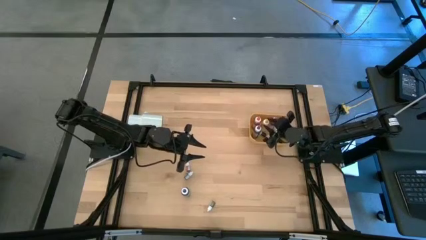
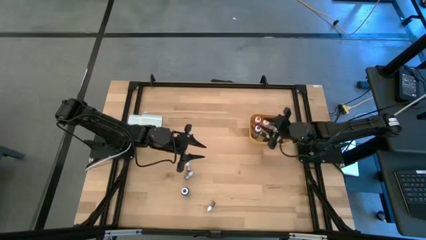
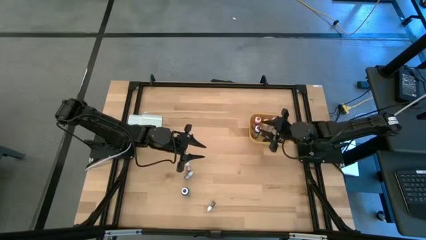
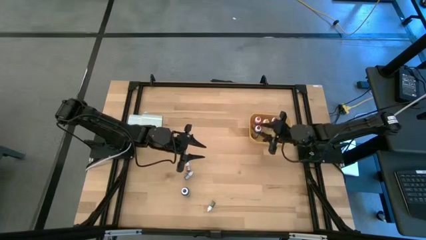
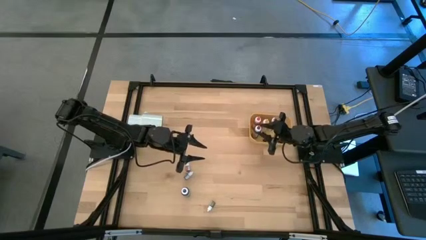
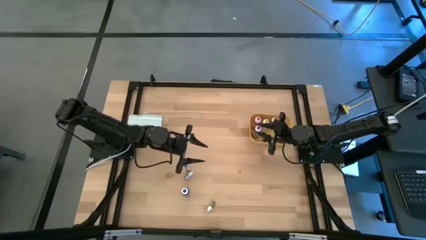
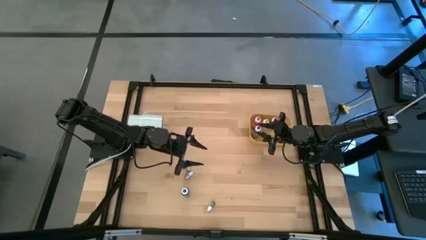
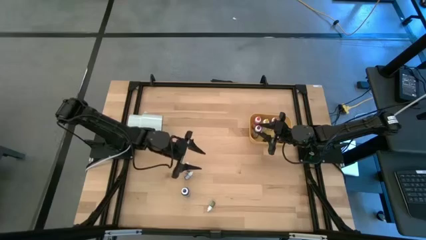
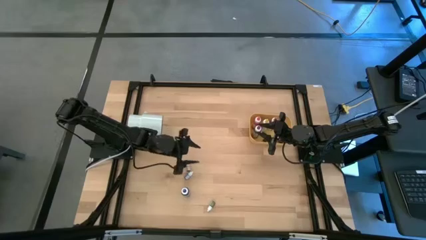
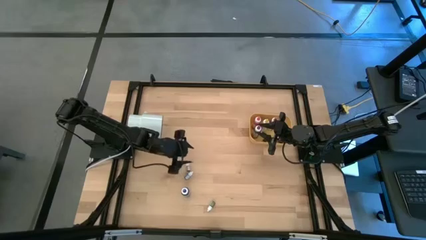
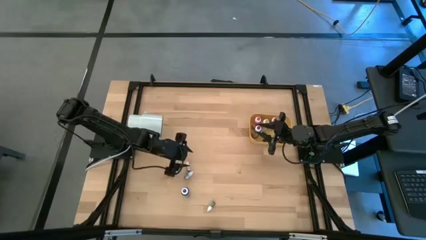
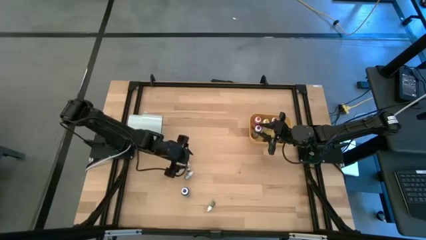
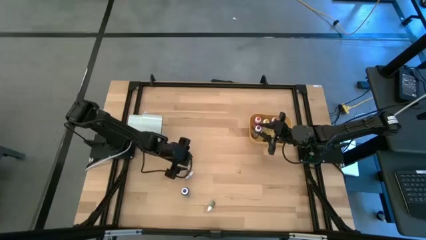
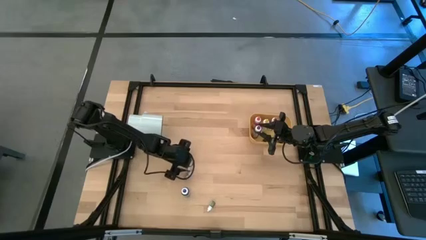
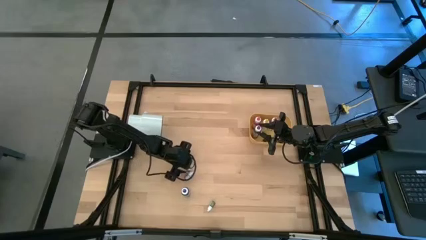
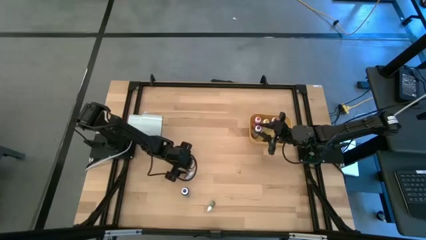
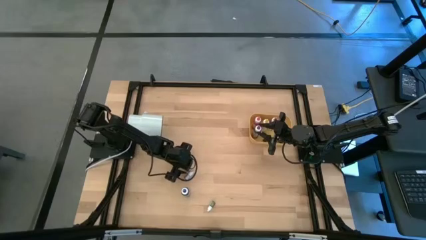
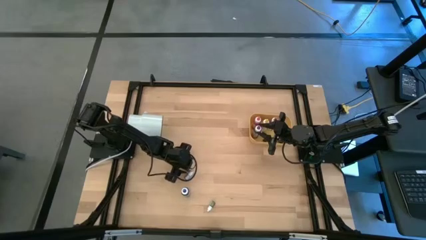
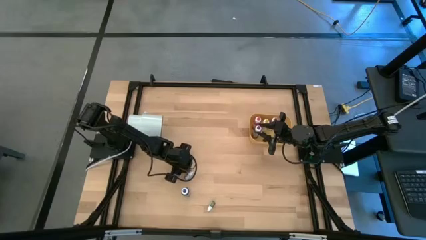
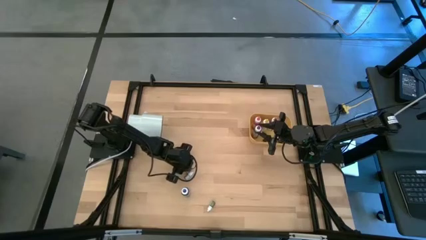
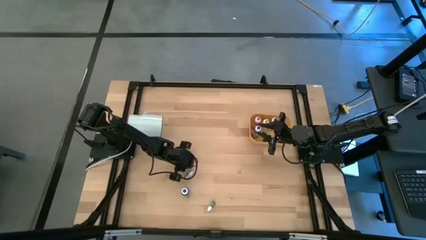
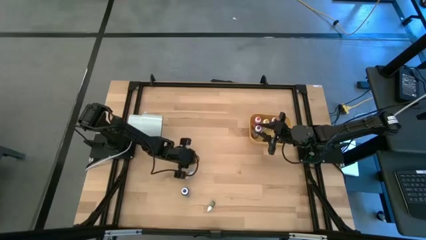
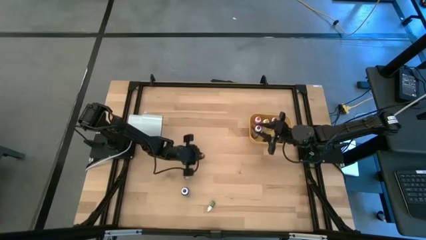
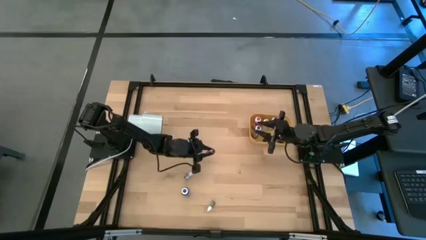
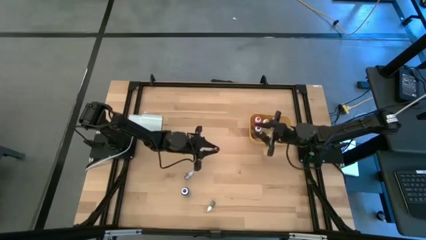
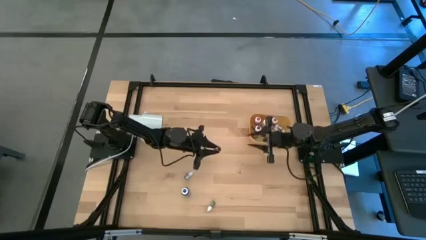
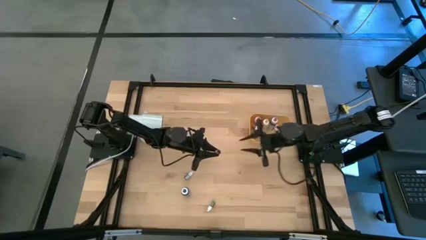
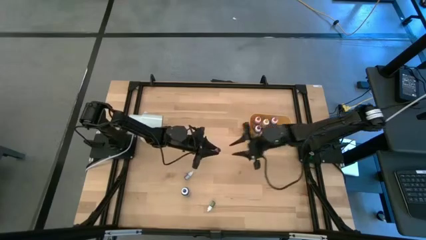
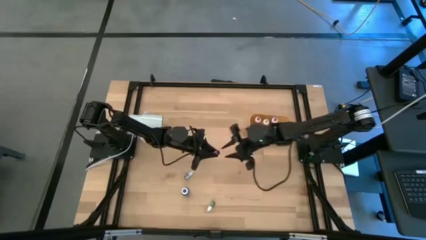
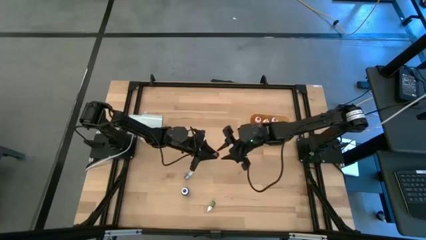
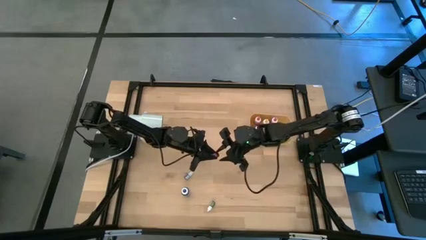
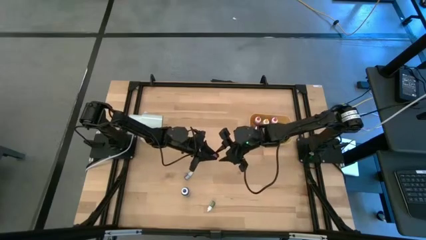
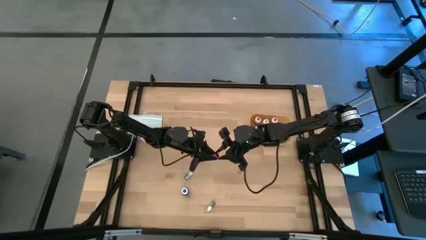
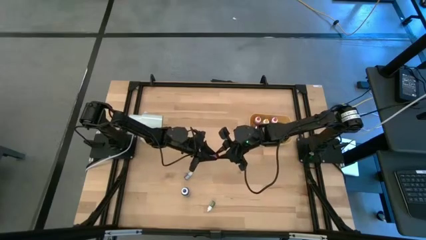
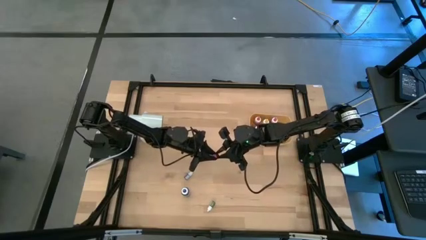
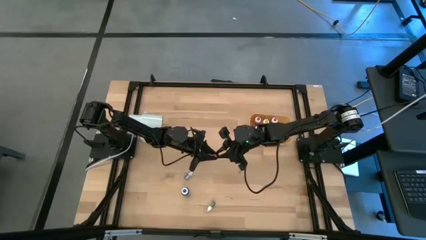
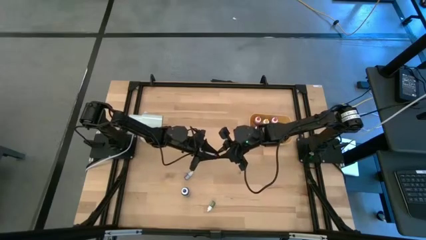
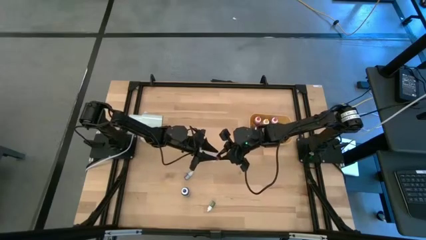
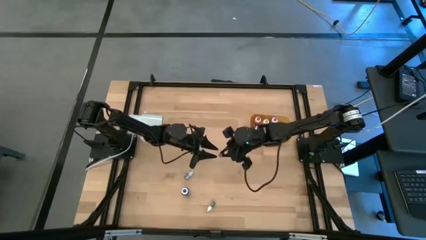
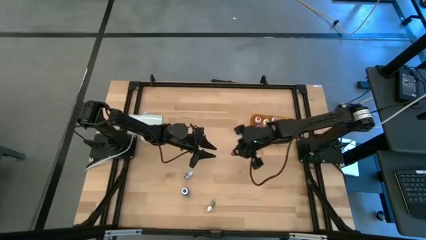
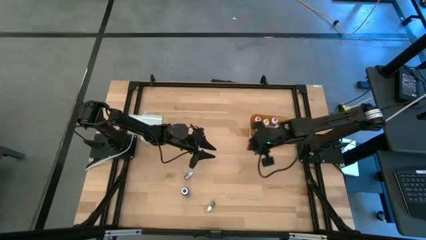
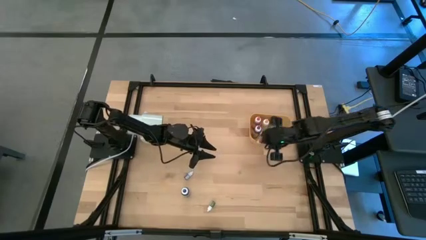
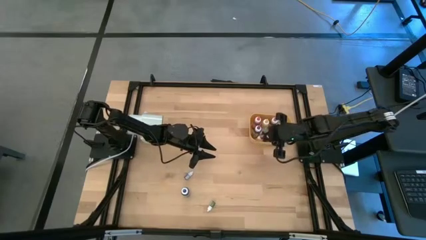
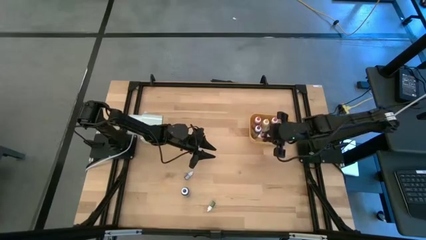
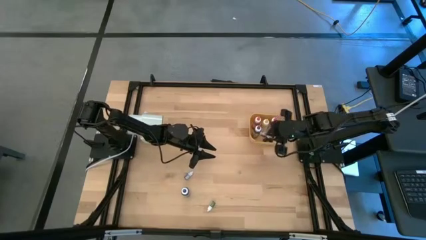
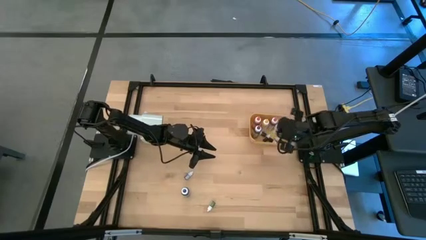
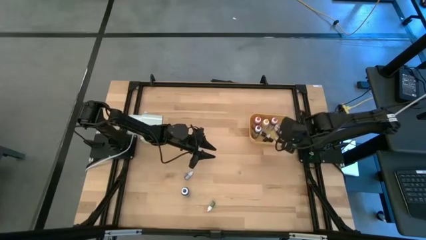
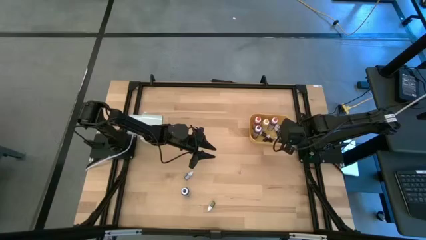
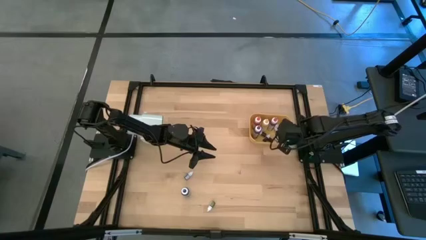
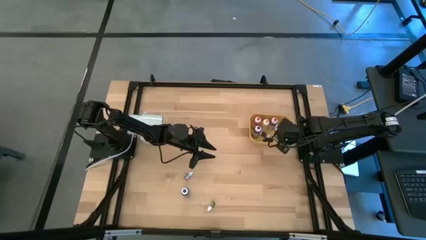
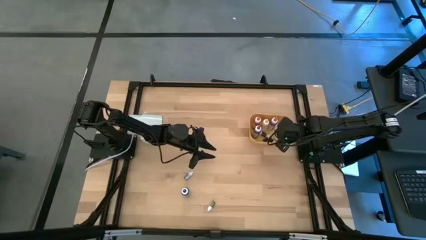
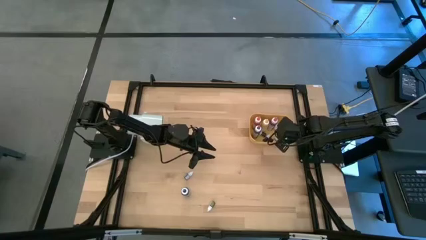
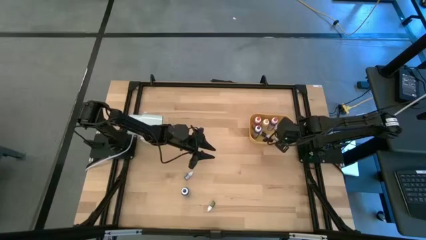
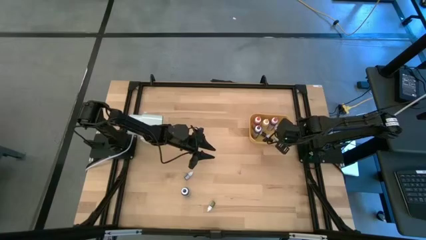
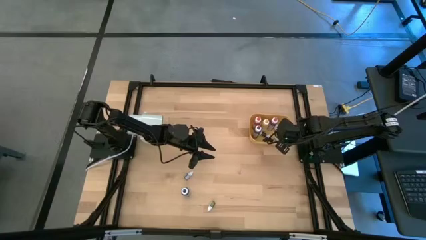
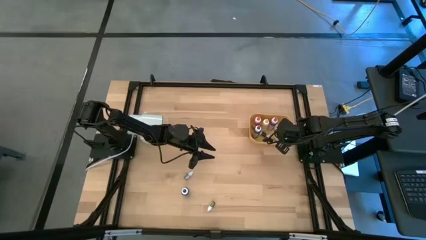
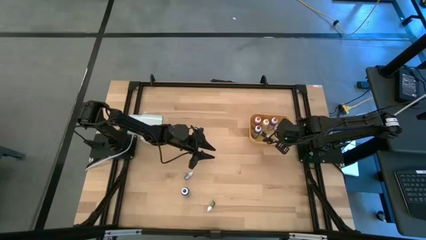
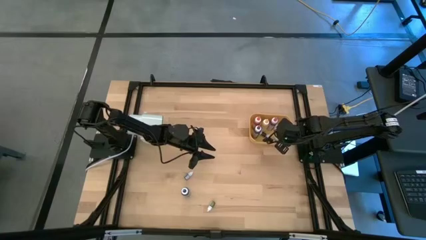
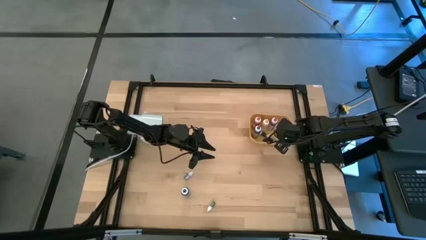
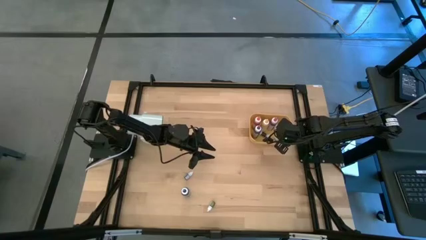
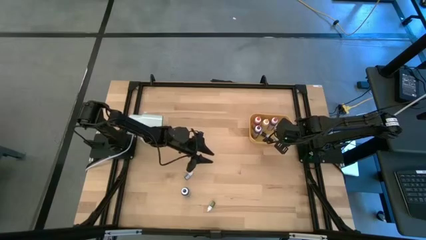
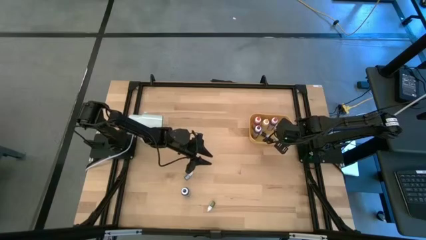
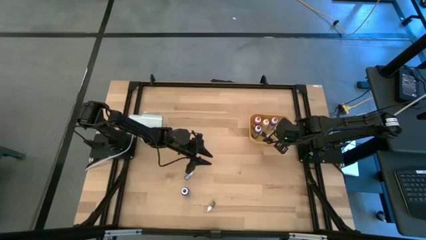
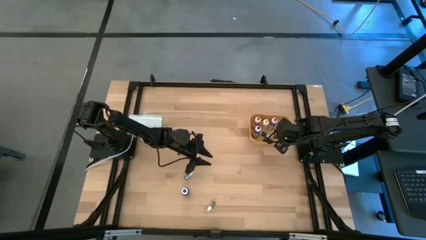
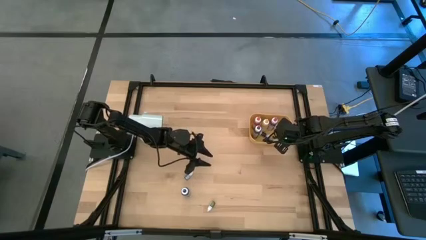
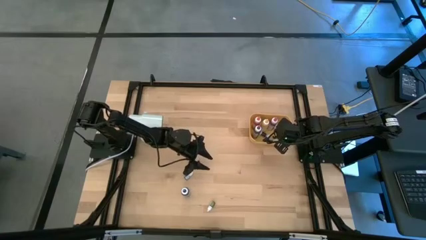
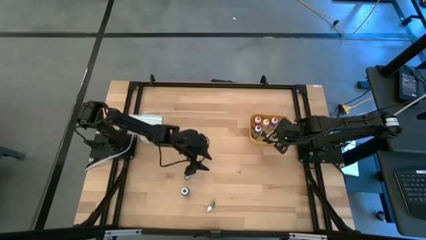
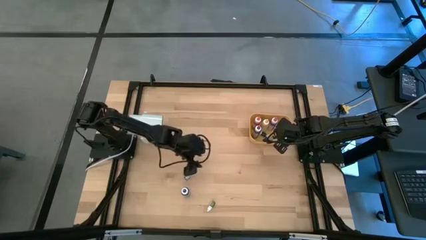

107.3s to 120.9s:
Task: Pick & Place food coloring
Put the pink food coloring bottle into the yellow bin

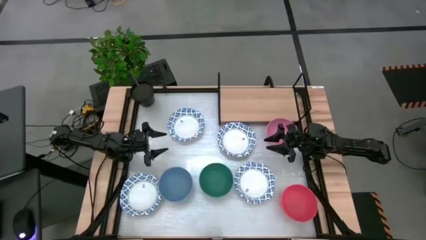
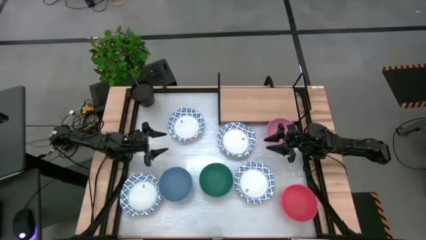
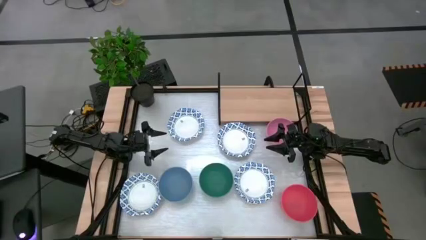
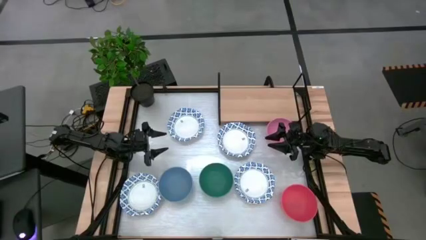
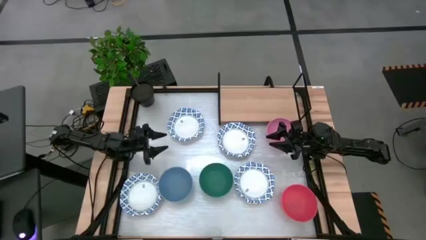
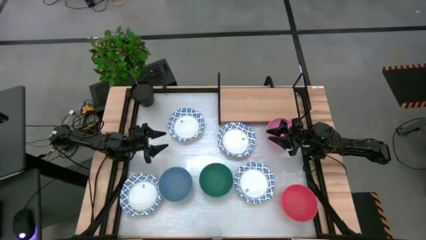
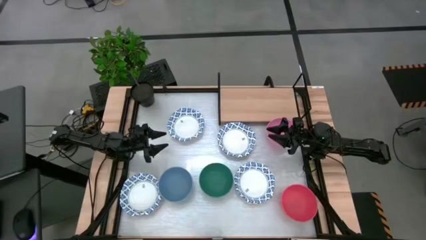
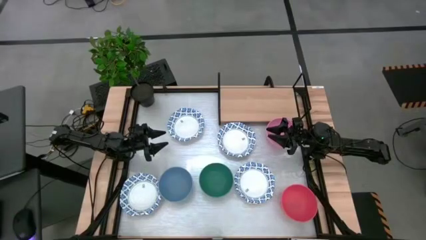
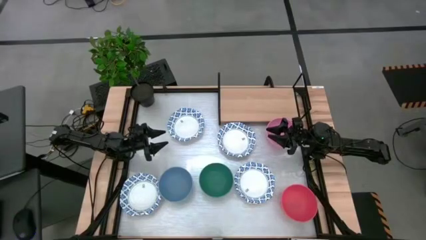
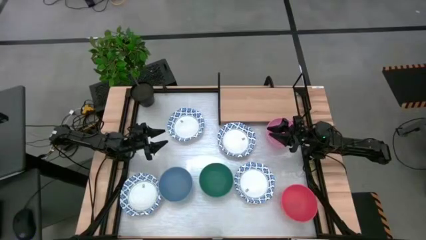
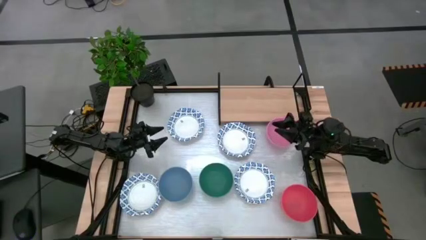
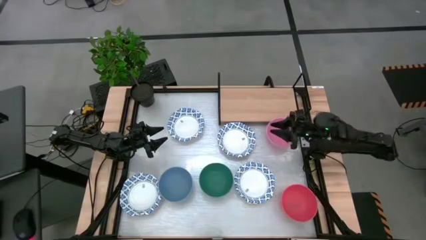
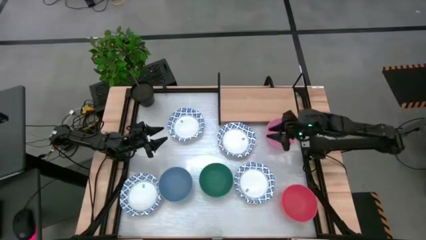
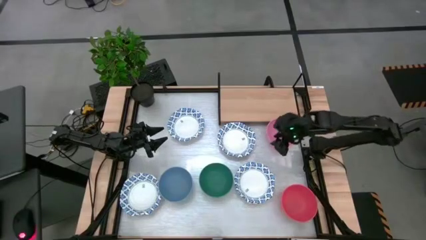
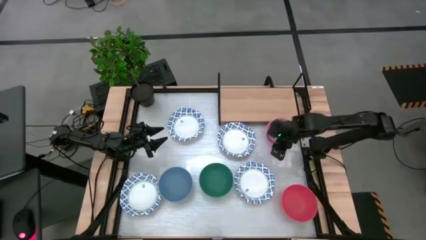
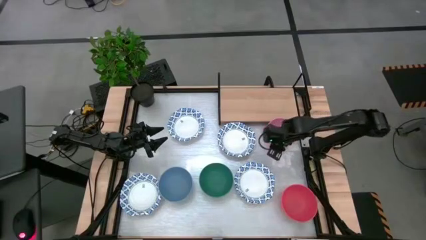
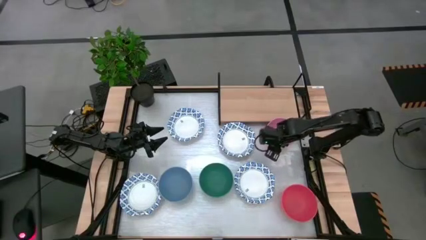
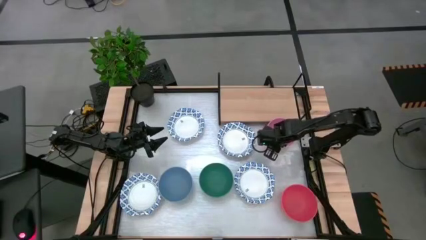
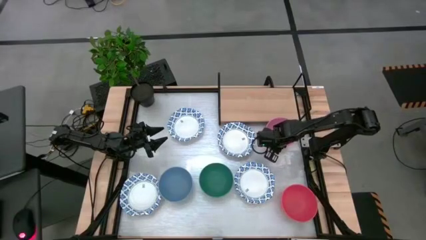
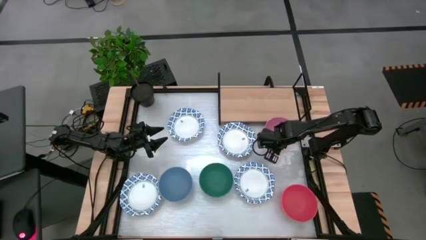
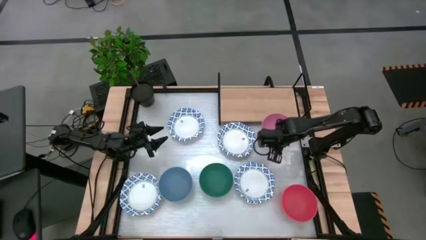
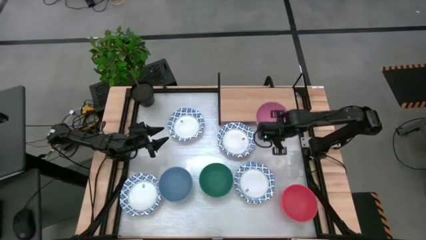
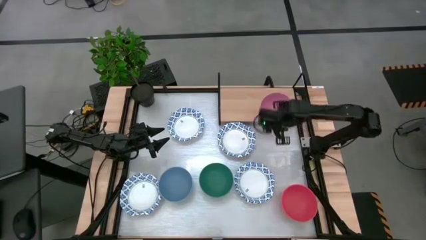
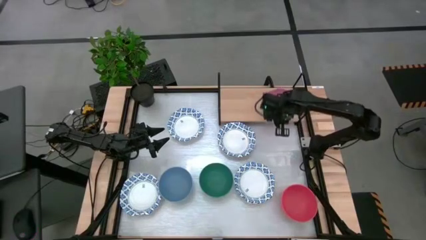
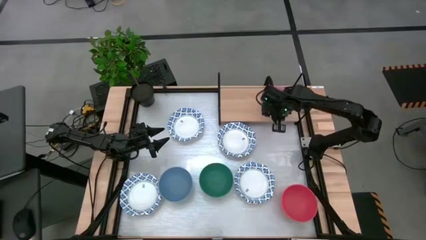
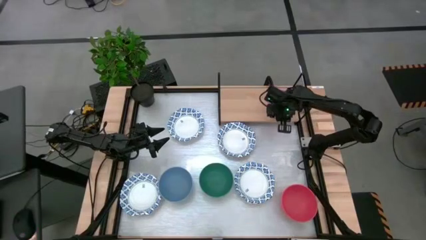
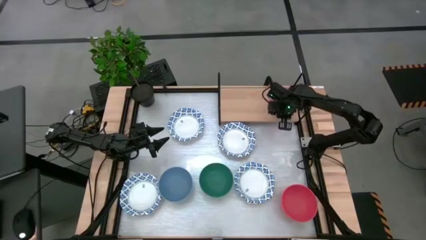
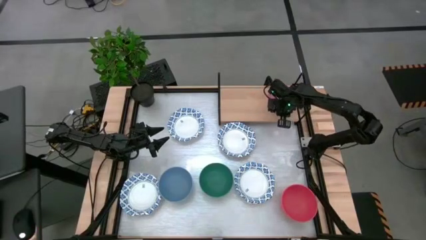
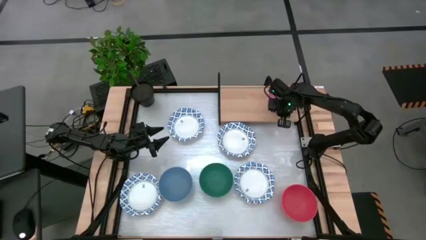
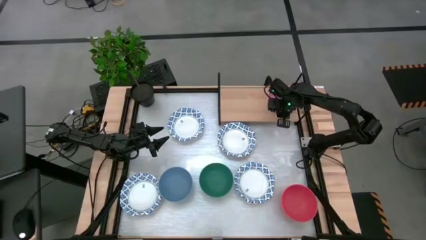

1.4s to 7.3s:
Task: Place and stack bowls onto a shelf
Put the pink bowl on the shelf
